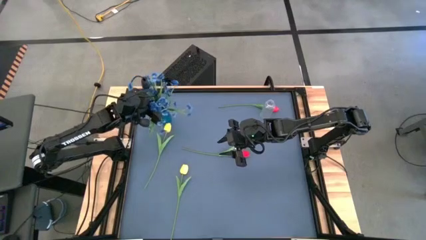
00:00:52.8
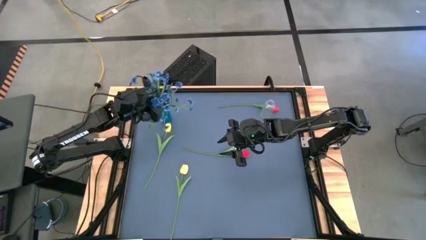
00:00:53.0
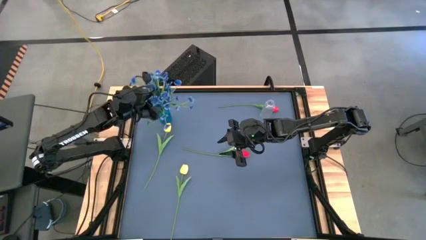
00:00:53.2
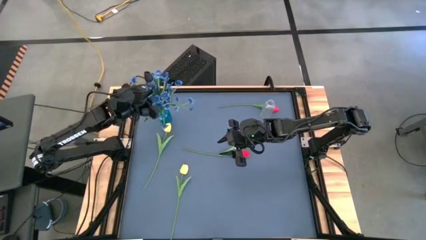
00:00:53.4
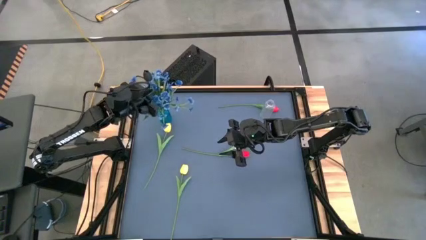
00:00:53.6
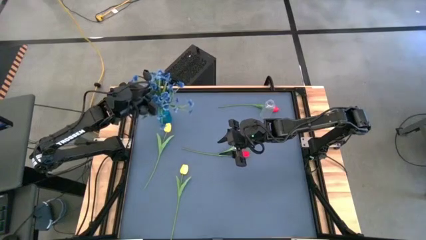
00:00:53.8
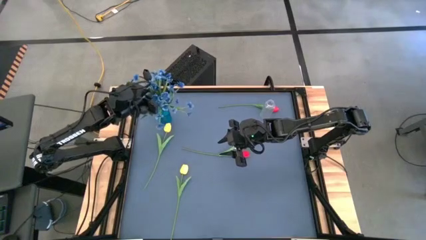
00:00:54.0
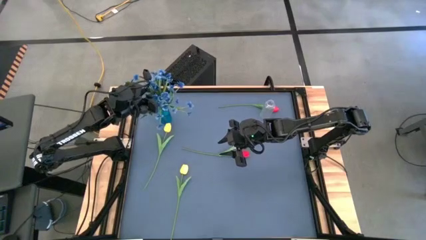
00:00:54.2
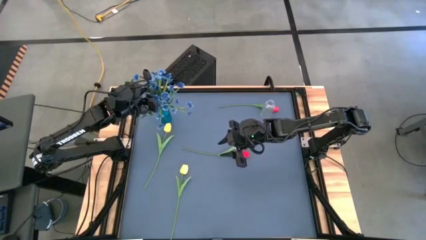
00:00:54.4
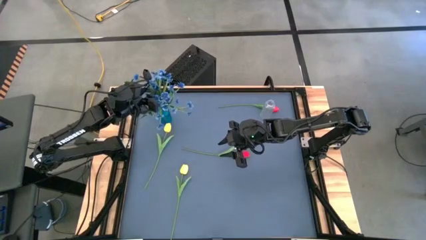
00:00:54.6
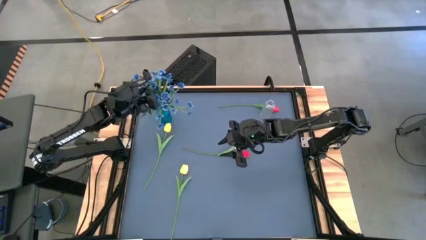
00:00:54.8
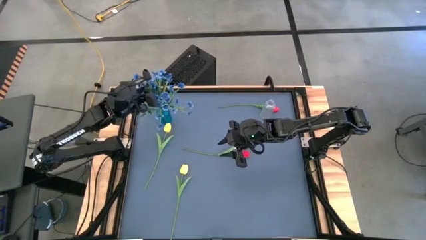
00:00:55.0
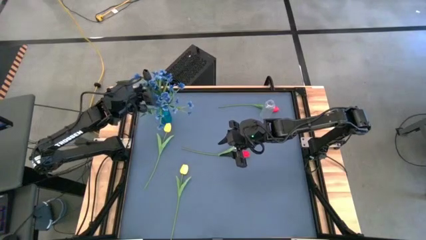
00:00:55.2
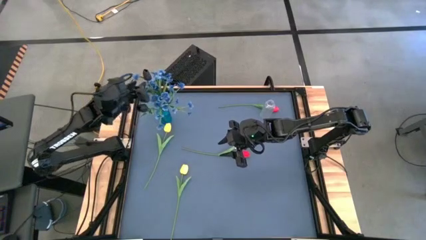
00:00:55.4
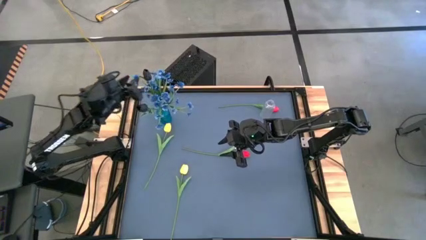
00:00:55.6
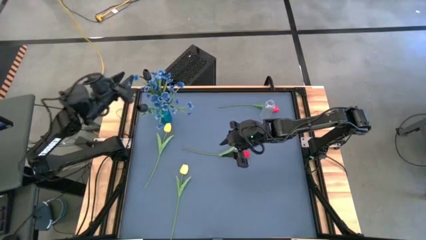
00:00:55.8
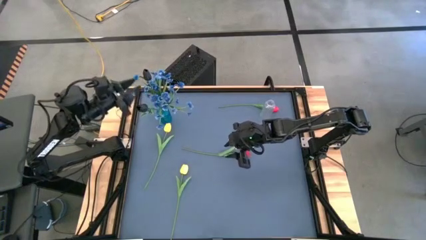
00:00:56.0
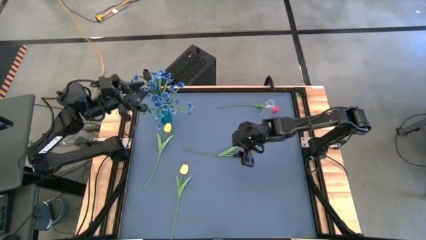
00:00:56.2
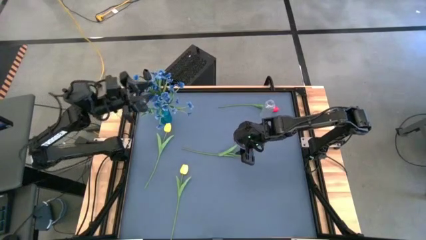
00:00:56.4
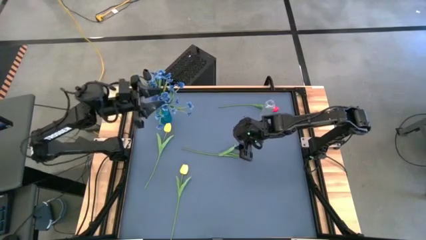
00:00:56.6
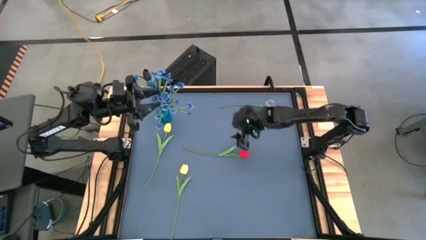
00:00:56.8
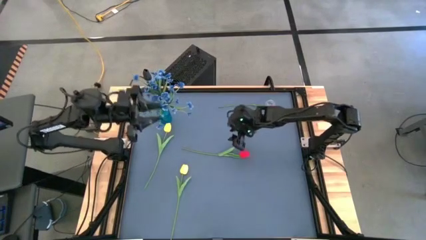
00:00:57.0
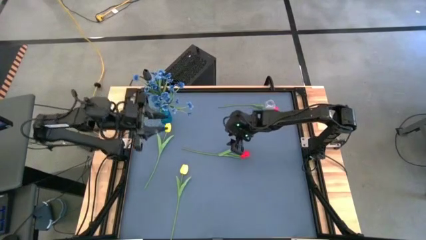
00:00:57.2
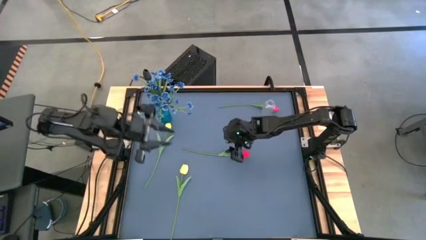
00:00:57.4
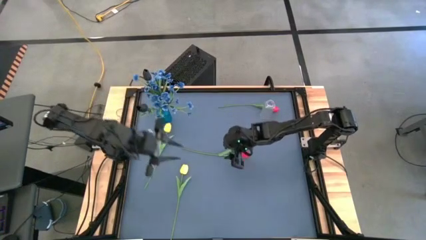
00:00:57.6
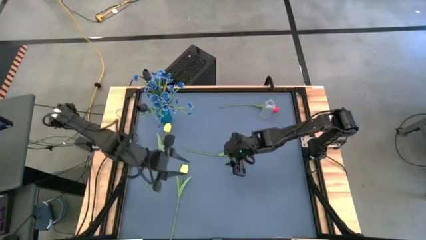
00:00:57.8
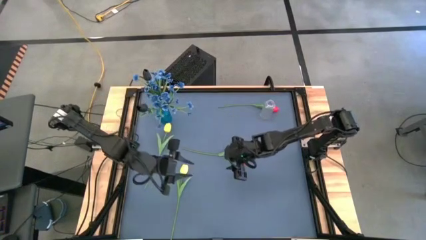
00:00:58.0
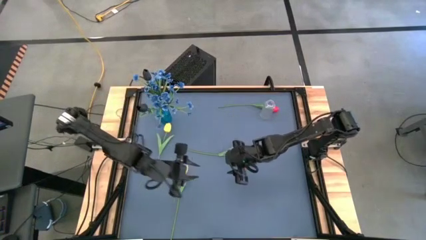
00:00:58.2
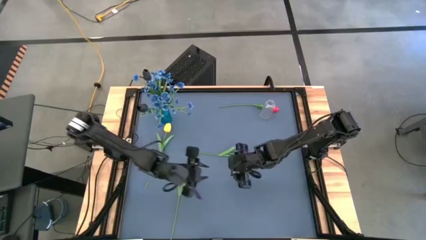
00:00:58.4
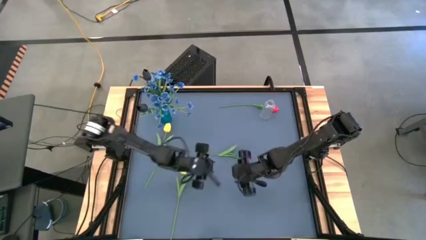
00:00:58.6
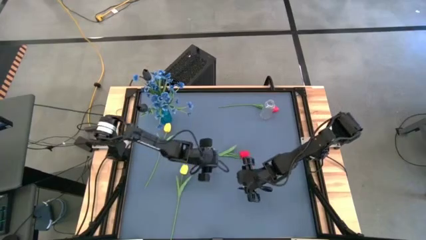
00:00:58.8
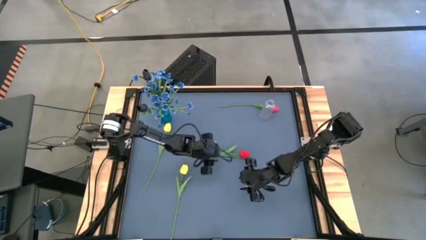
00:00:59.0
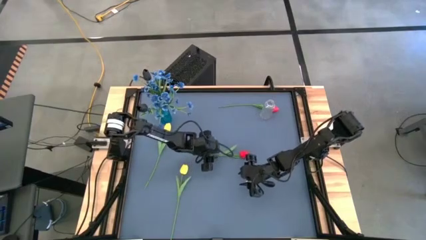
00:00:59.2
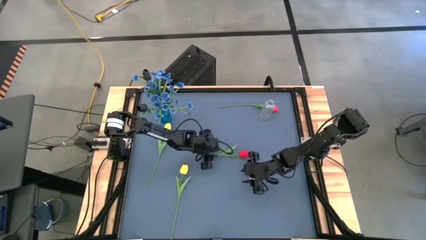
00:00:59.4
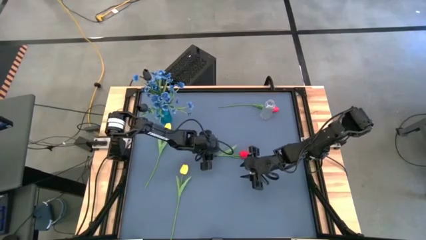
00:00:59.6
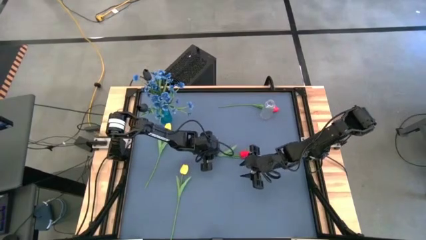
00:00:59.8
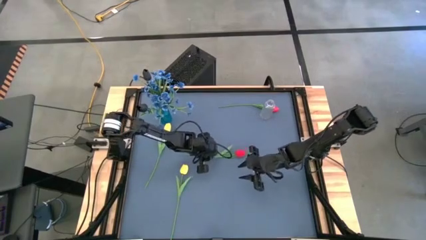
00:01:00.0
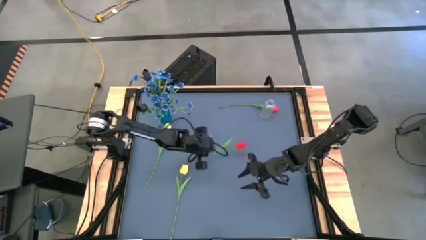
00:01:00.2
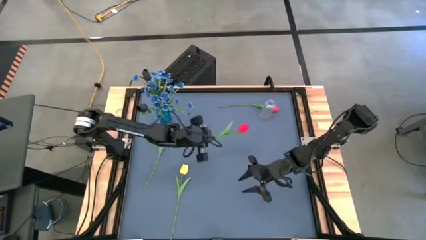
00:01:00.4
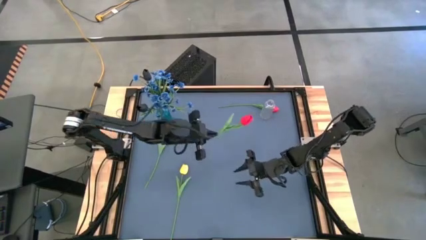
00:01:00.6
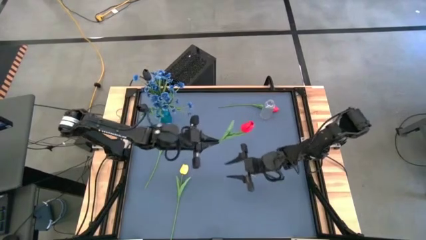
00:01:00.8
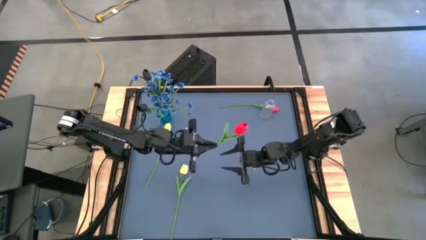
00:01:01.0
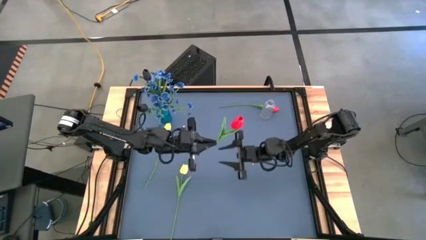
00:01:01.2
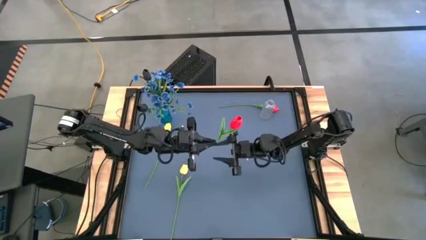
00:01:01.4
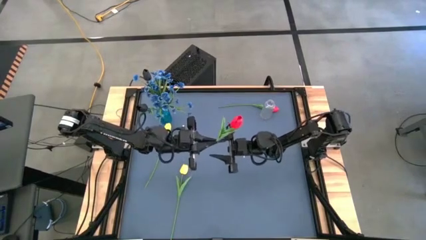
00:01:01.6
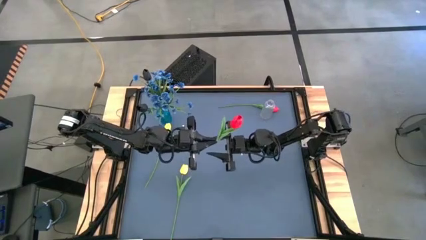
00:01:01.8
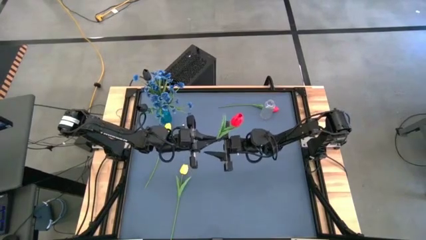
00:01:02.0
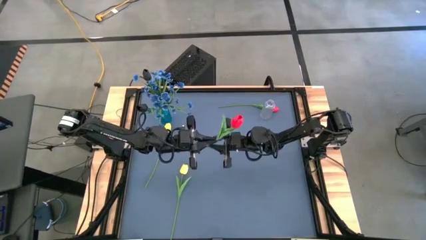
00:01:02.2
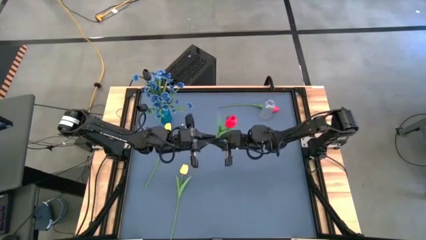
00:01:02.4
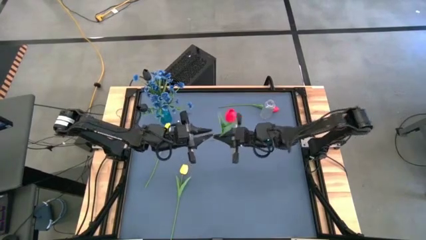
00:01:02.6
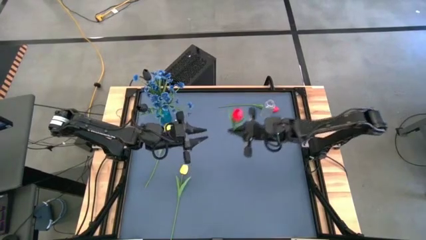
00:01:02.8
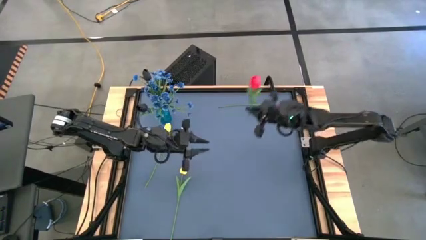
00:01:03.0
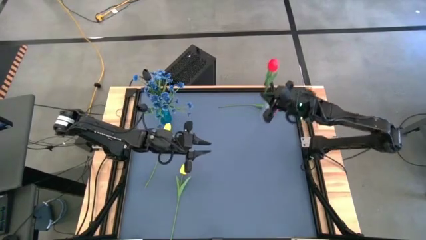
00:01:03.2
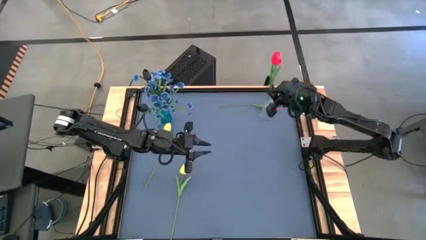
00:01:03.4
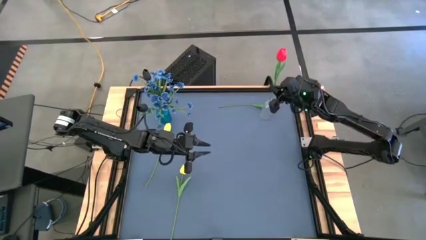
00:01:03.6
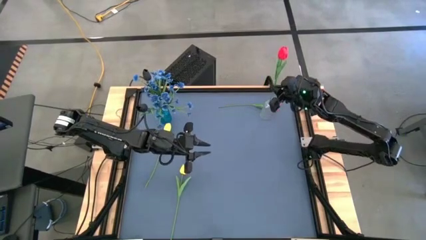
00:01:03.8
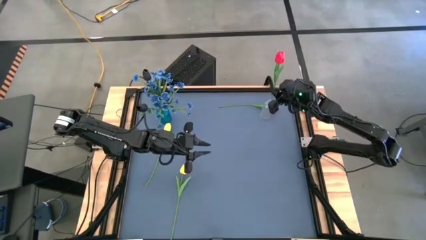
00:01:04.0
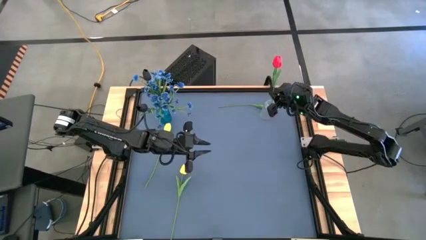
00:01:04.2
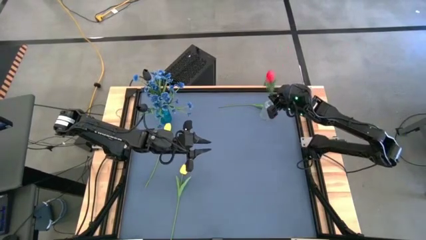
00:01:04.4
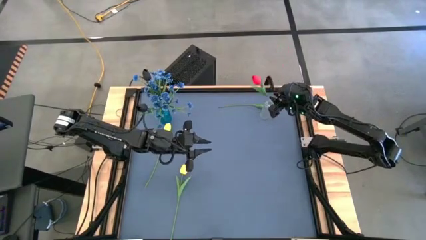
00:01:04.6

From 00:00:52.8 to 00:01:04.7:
Task: Sort flowers into vase by color
Put the bottom red tulip into the transparent vase

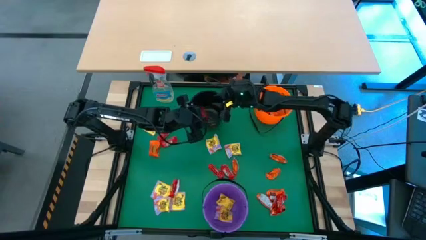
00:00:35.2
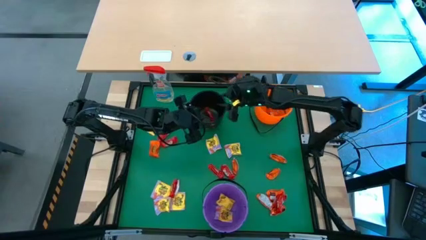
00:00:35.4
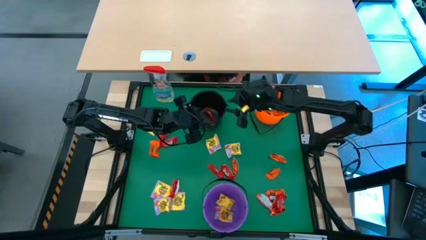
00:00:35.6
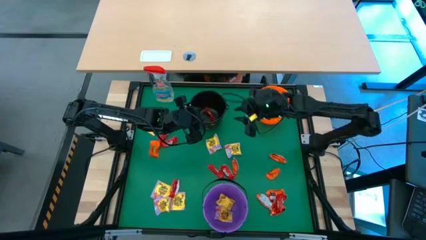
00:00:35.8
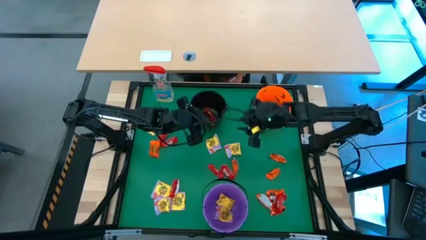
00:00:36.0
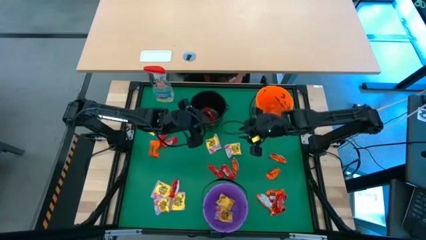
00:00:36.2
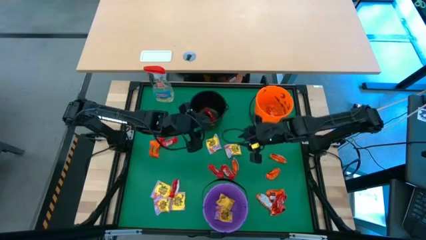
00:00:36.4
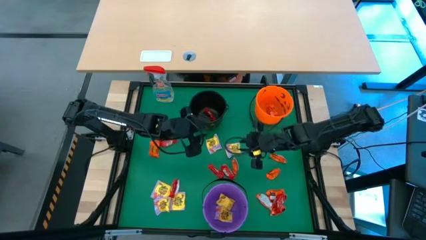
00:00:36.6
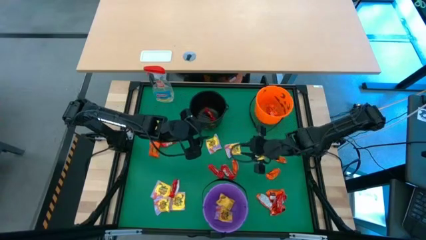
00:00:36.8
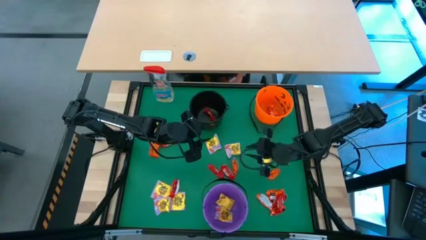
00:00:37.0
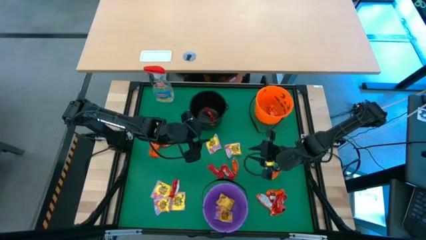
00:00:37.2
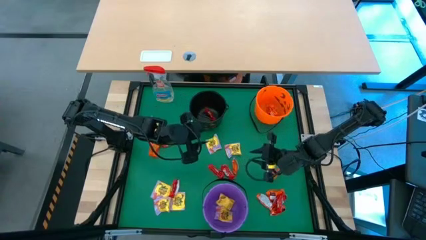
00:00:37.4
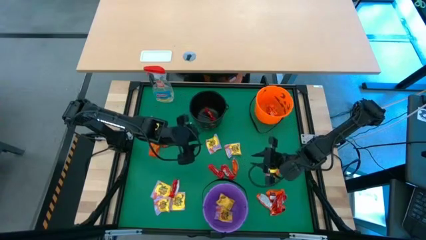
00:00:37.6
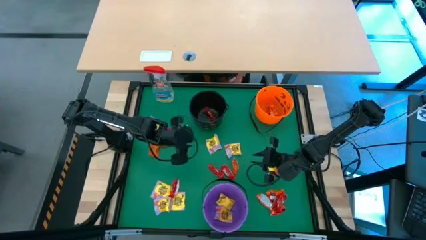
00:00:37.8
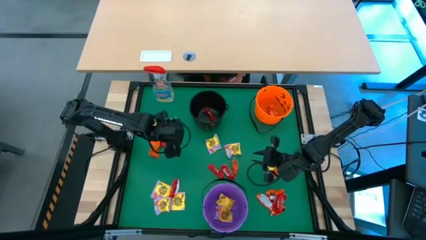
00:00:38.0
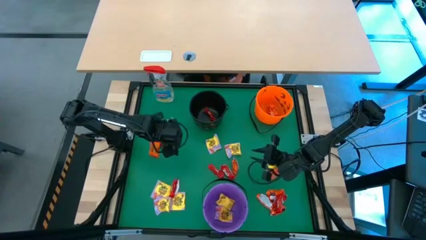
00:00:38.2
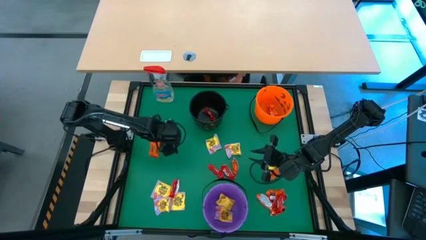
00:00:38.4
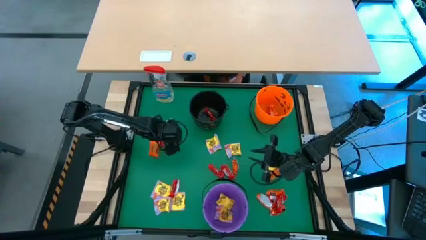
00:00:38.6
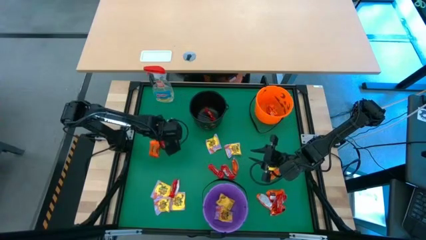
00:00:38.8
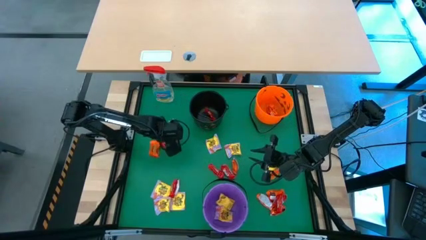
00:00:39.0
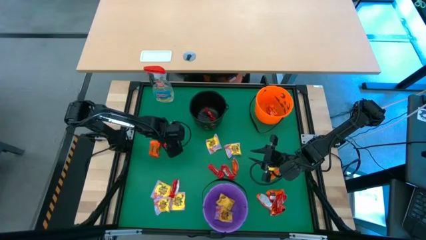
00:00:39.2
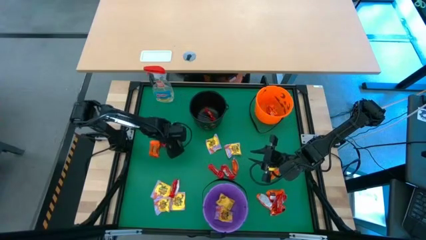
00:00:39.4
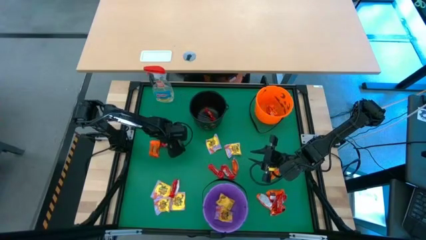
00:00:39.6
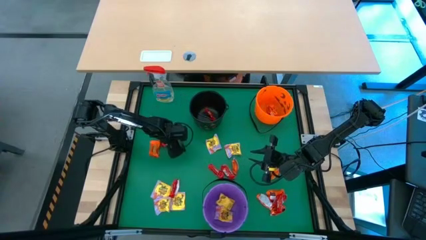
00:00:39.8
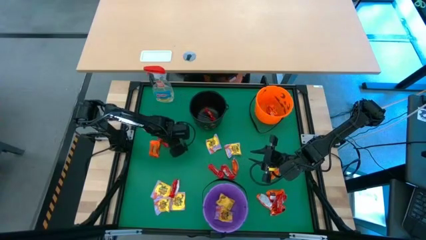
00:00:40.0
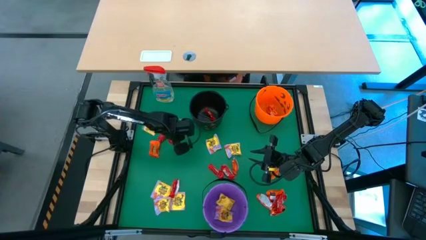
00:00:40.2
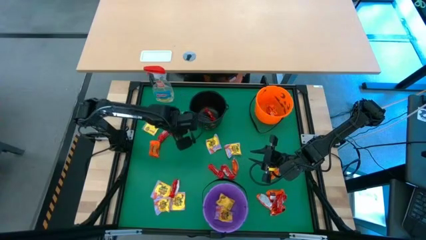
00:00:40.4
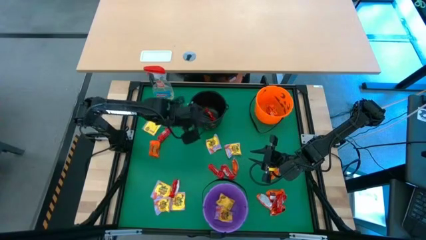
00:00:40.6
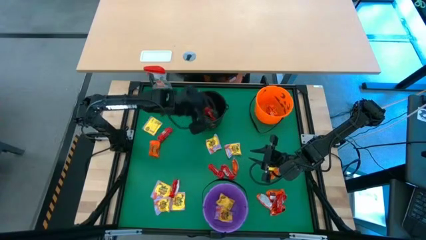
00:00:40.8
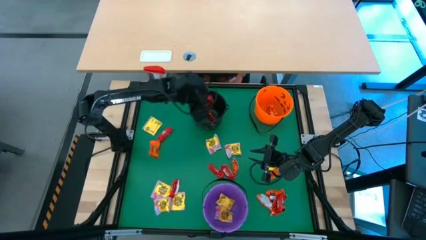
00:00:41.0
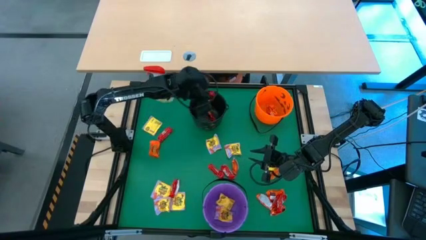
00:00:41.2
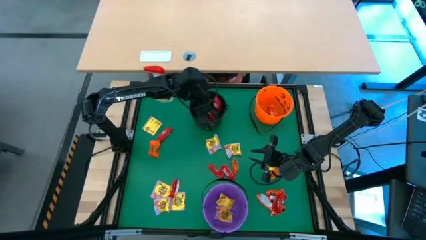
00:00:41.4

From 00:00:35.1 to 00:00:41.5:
Task: Sort candy
Put the red chocolate into the black bucket
